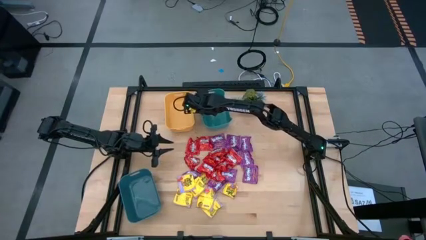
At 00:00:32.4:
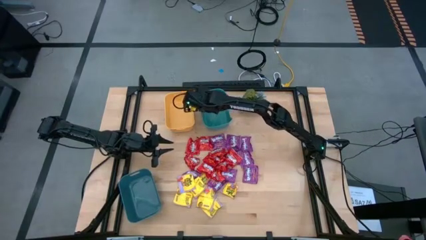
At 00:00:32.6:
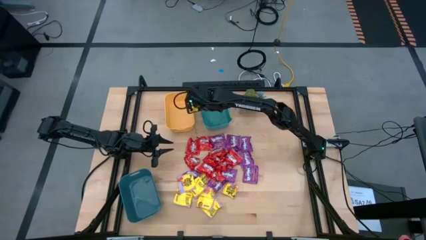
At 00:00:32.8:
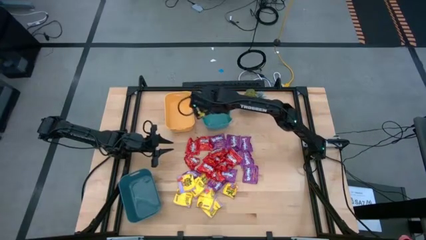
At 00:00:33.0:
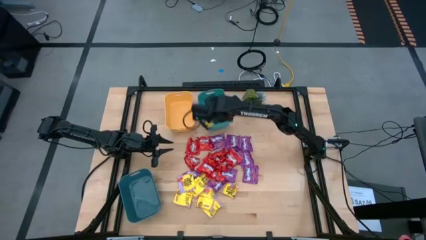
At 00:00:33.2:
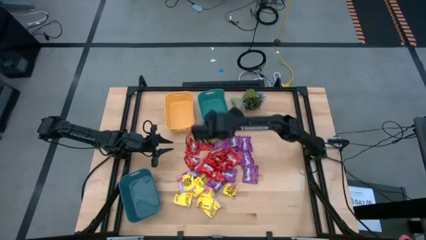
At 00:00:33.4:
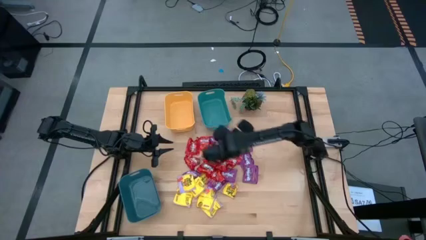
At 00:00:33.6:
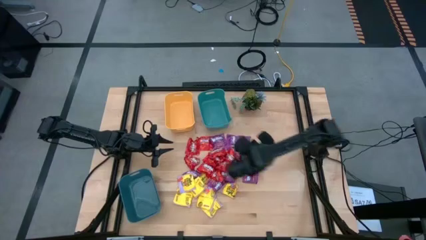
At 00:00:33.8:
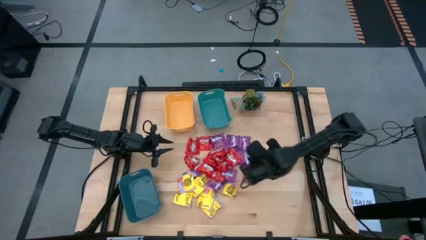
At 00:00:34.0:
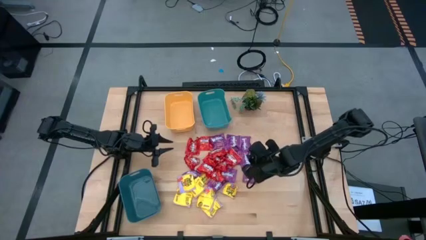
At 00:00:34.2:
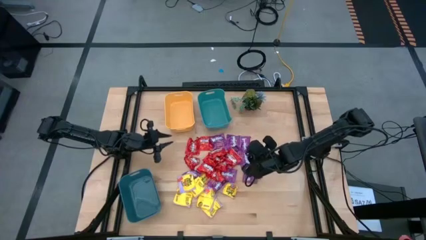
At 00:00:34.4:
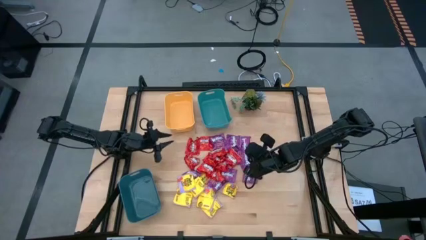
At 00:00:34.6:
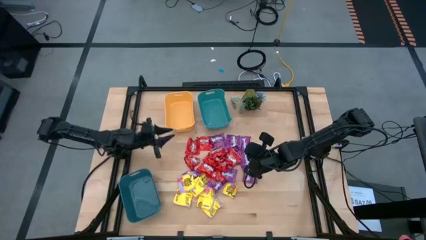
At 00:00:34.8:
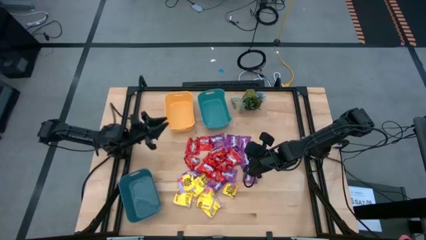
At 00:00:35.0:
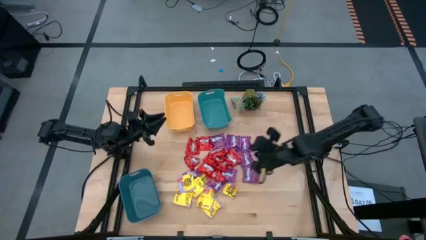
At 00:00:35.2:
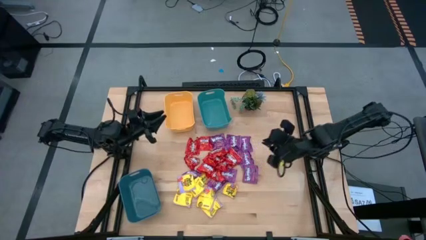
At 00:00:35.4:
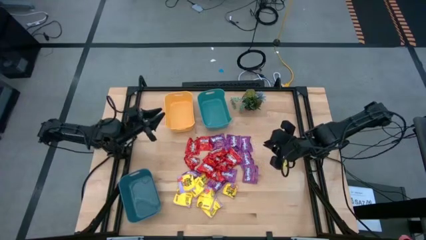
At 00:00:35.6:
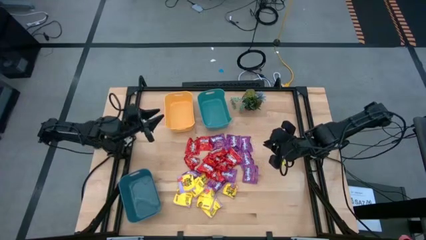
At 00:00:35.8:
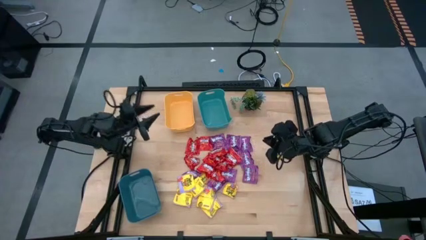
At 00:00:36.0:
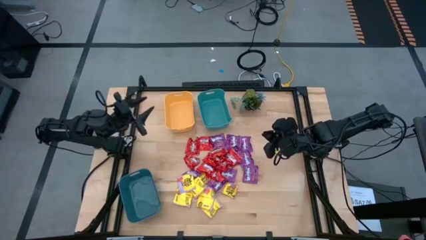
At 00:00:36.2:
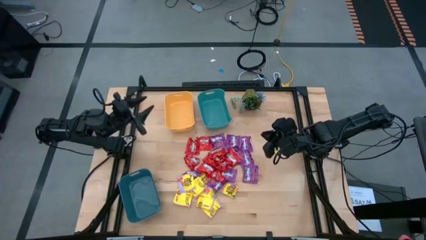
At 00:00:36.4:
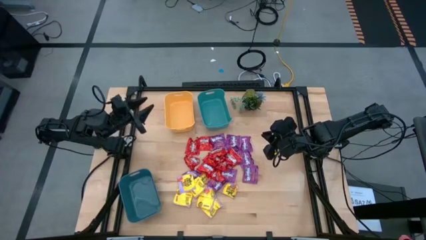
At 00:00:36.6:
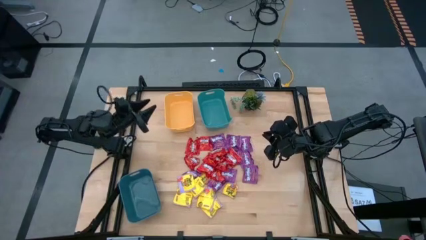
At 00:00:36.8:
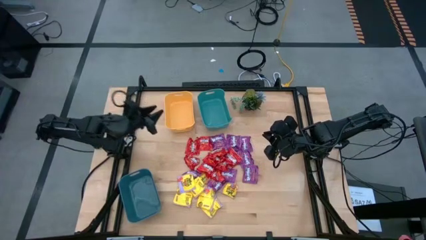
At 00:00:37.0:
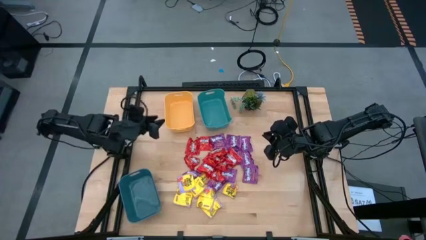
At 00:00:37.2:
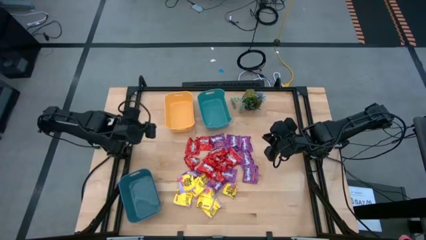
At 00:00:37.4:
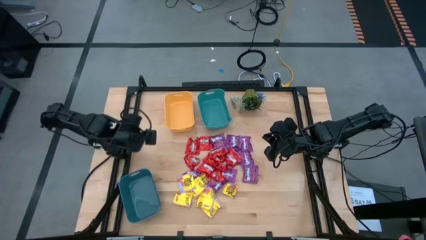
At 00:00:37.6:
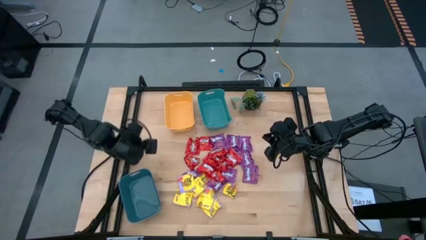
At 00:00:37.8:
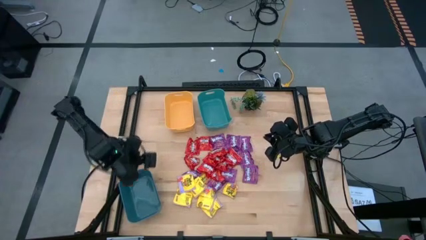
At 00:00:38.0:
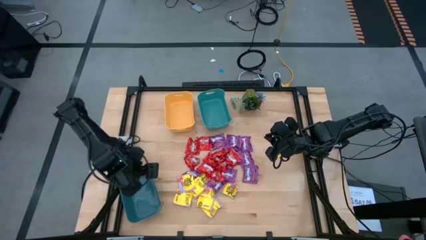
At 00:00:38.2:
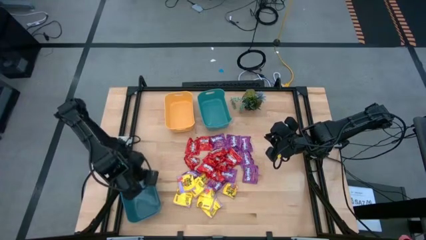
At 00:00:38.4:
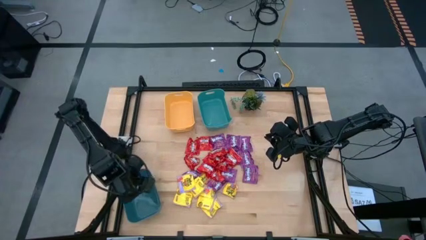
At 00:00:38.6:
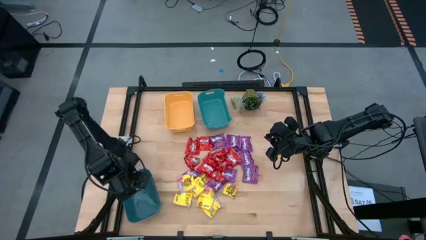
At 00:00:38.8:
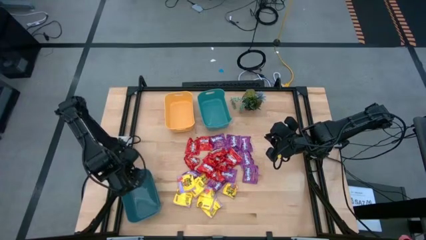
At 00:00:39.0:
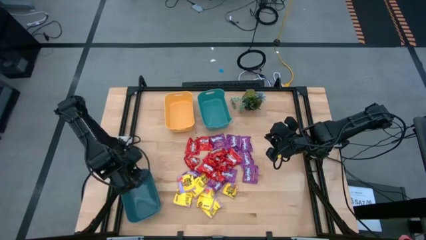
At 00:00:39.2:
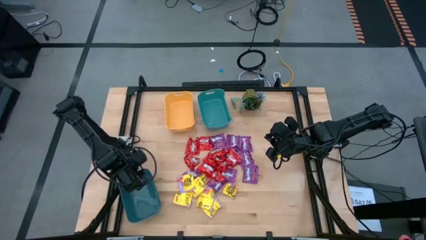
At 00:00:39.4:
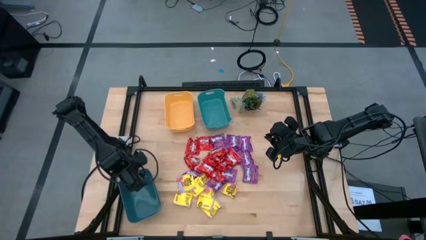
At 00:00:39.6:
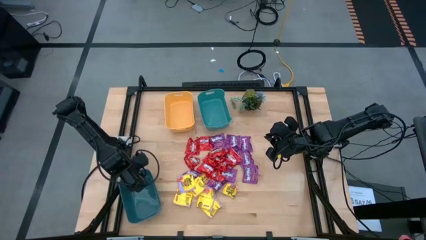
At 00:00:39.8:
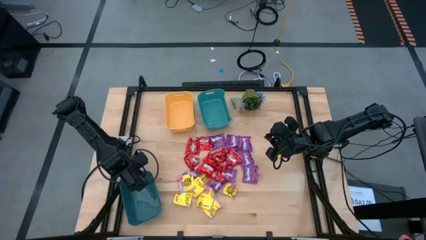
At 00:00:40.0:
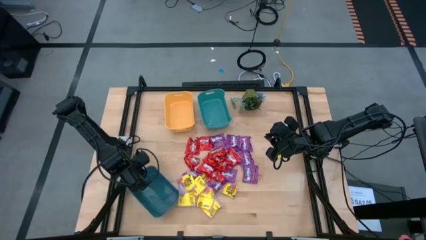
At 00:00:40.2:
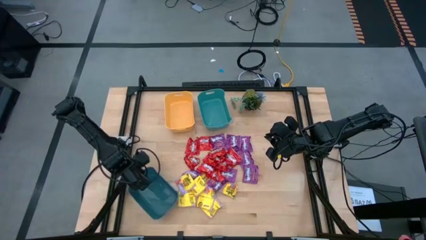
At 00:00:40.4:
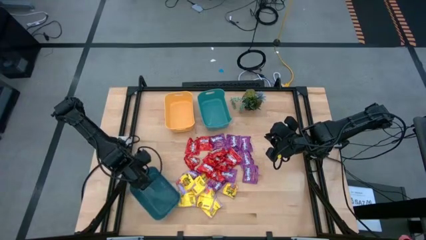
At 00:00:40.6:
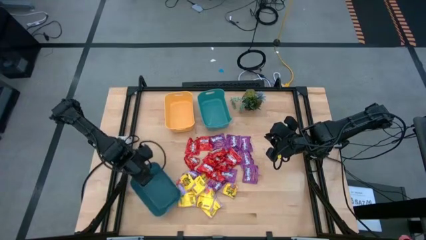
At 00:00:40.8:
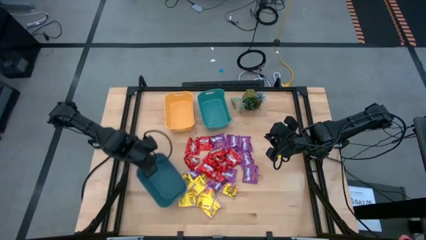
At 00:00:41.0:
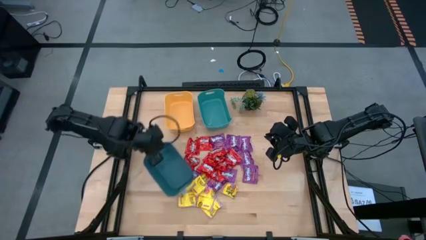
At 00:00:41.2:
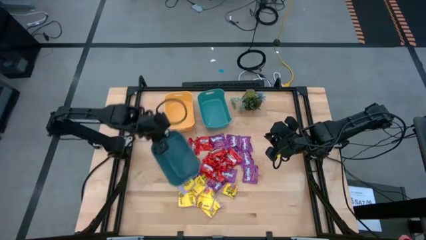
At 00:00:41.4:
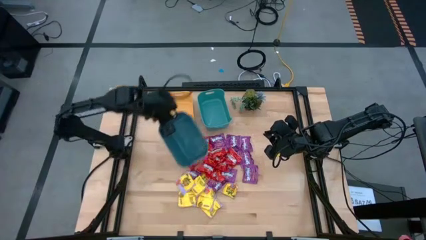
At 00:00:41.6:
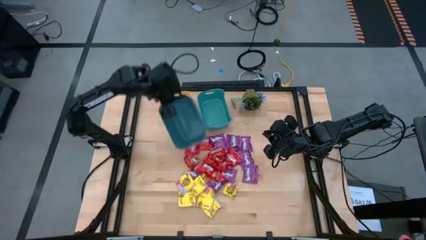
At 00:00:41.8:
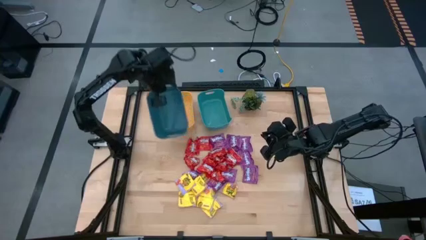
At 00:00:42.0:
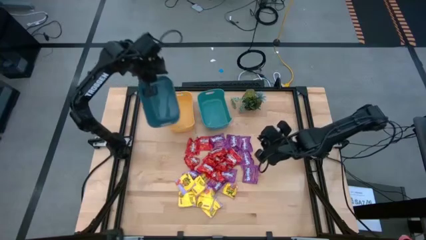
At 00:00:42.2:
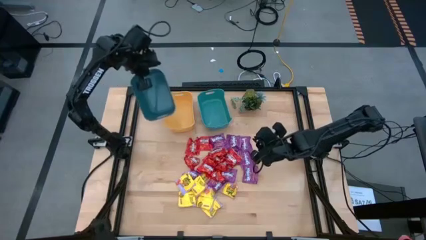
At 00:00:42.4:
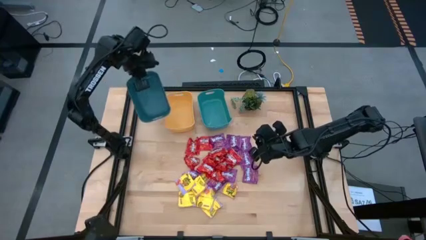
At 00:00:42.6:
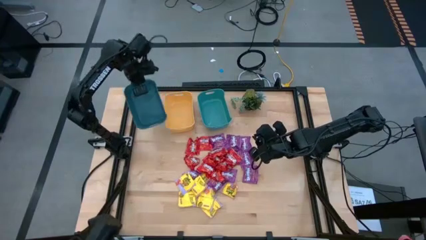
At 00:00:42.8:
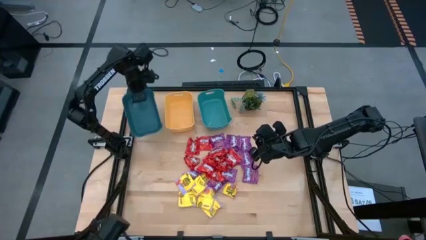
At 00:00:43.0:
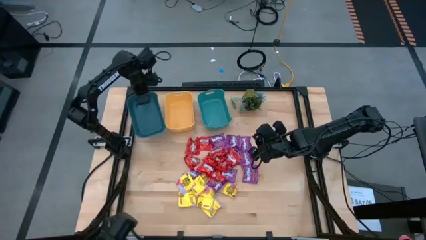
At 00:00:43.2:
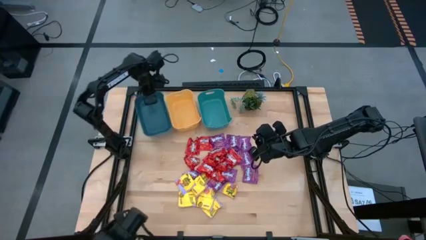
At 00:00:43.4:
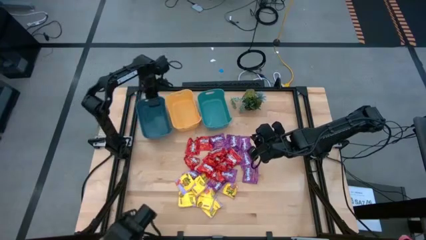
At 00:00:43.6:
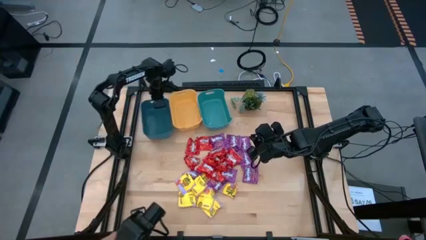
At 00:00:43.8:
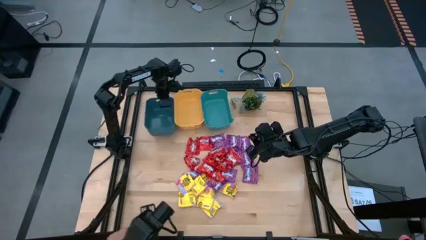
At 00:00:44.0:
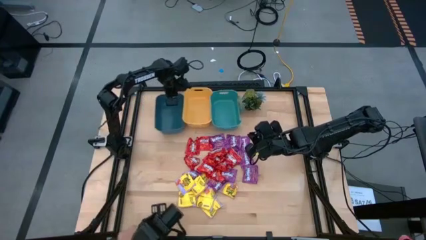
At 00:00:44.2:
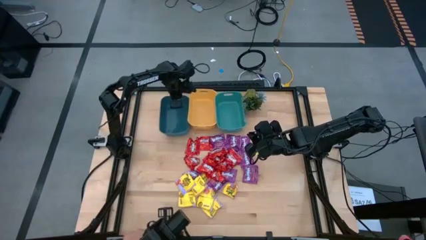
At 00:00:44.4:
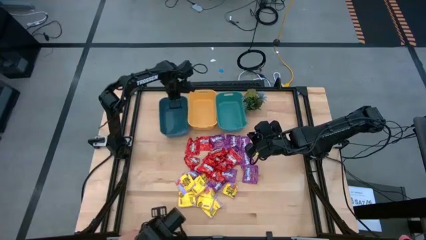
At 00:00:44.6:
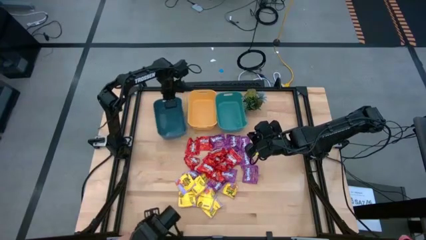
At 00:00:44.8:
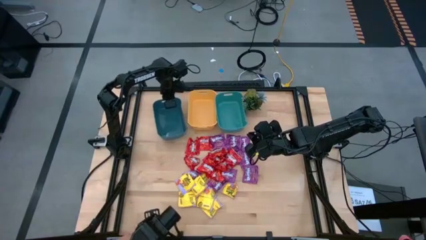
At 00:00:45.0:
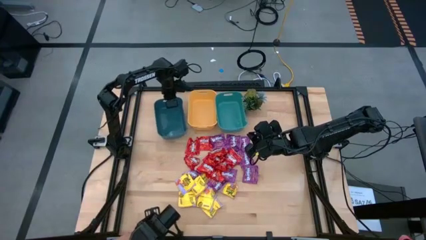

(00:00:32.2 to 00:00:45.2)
Task: Sort candy
Move the blue bin to the top left of the table

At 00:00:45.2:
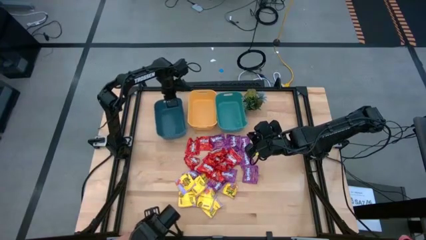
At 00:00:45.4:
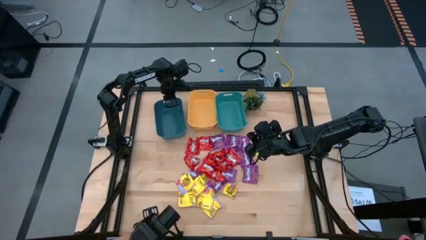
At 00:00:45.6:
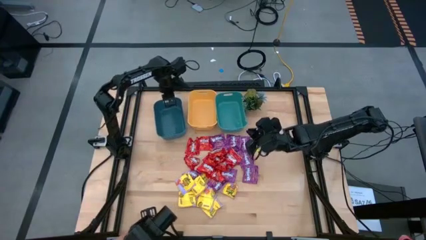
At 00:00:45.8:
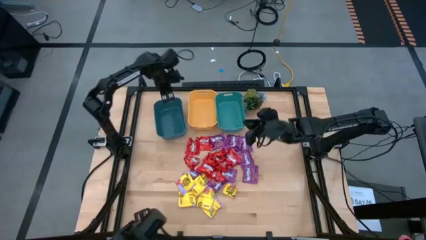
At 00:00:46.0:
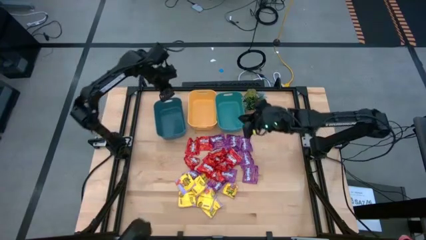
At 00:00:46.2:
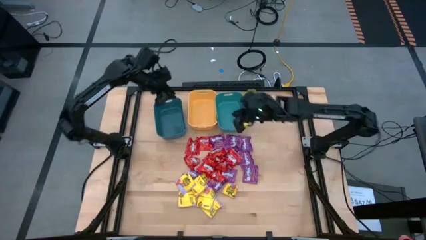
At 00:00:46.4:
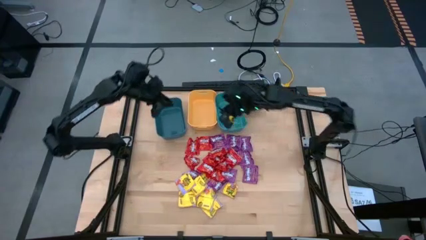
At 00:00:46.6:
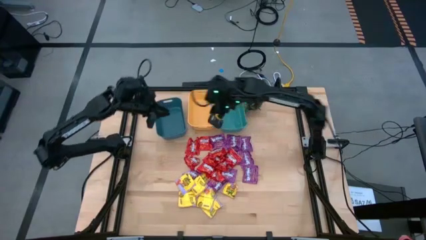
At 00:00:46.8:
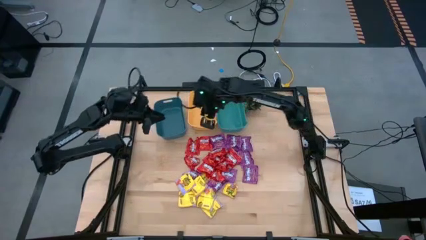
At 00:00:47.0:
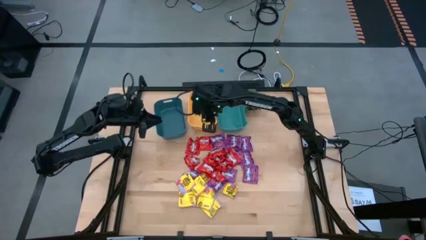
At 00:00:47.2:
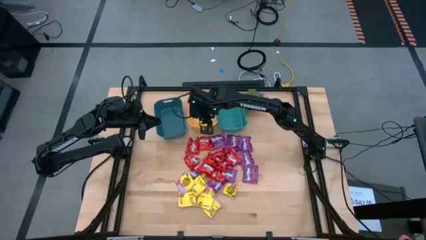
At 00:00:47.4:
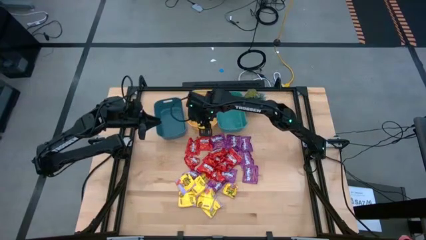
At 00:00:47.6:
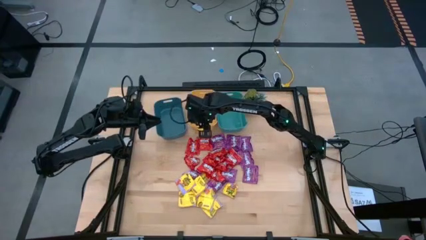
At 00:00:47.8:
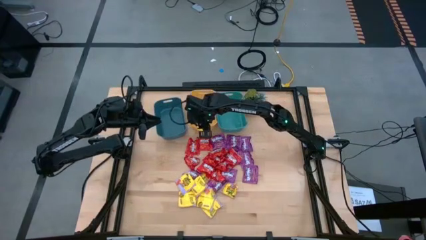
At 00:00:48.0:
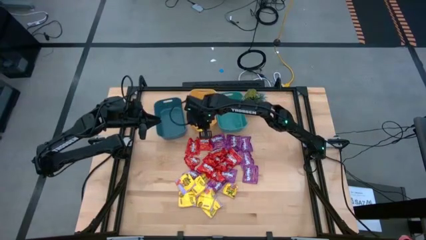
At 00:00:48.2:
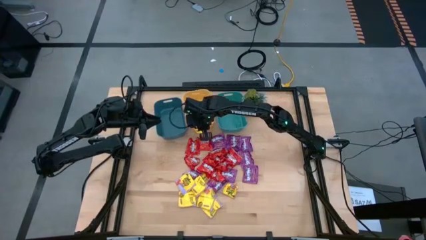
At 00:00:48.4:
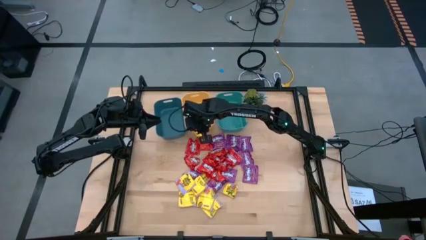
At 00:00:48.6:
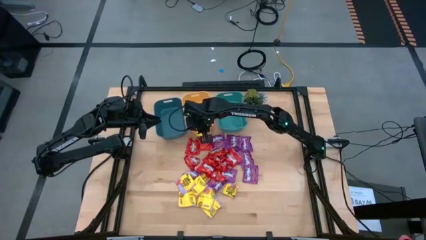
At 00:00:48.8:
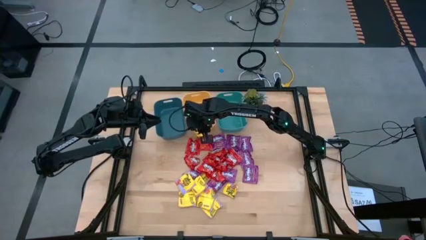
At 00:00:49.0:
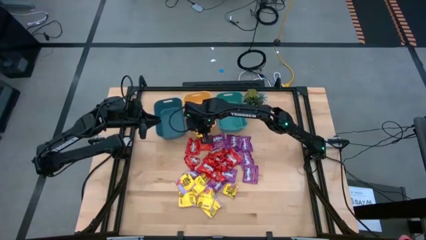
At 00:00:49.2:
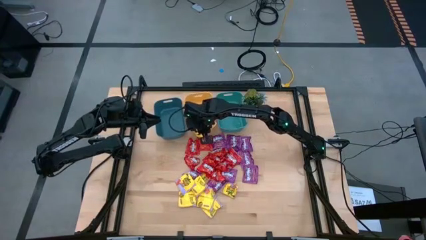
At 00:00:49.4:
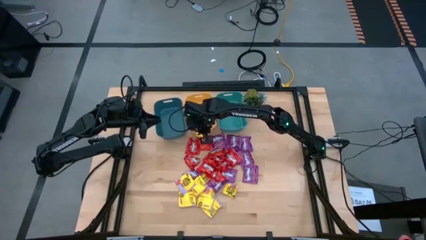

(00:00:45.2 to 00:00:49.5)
Adjust the yellow bin
